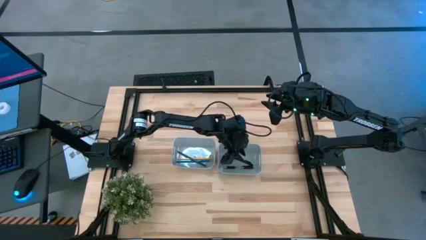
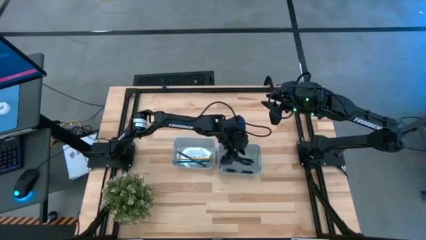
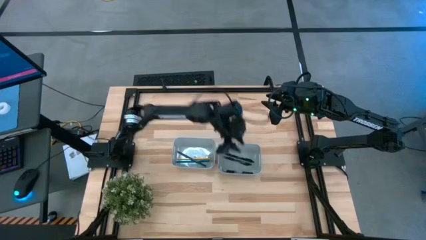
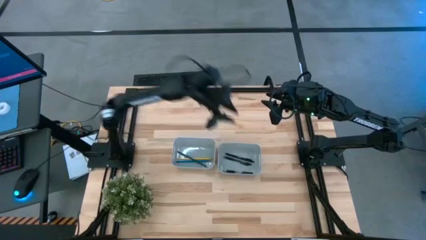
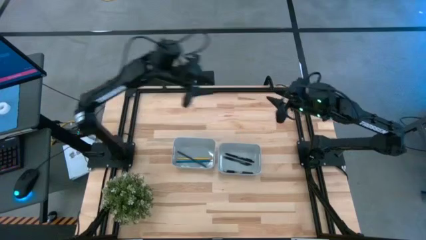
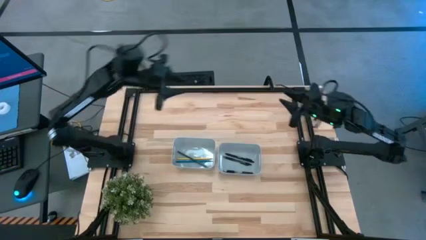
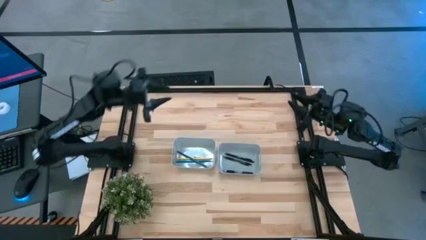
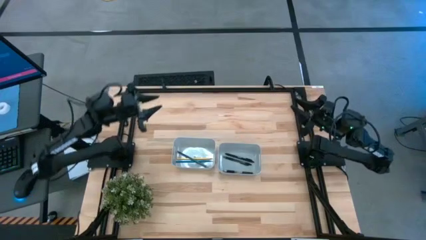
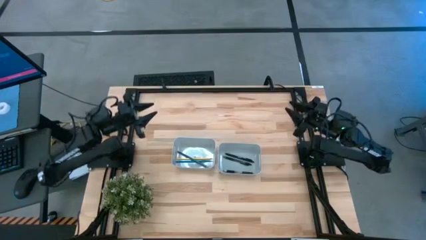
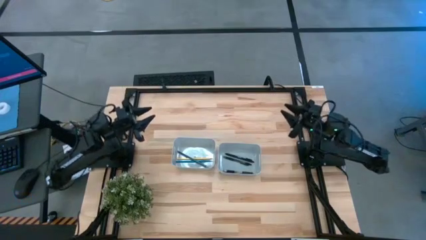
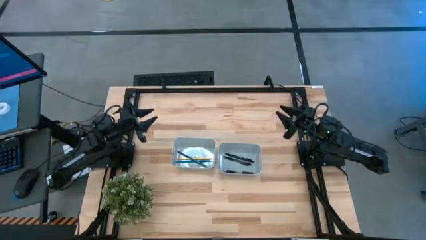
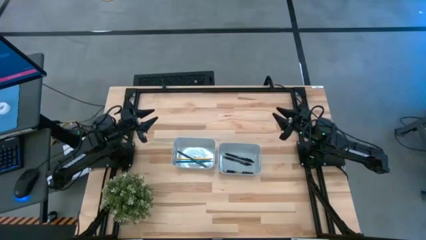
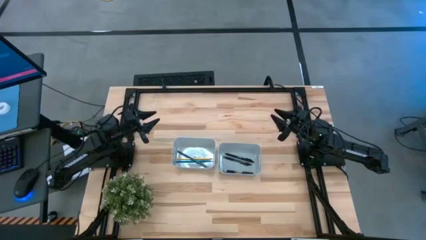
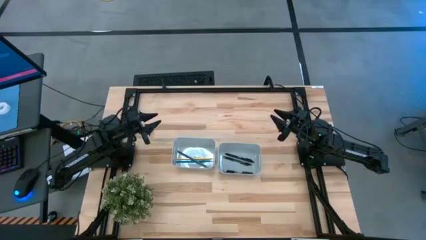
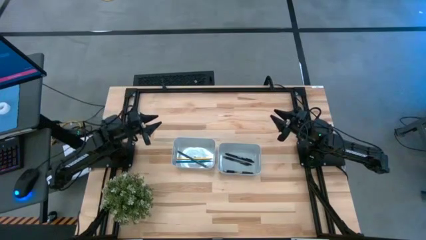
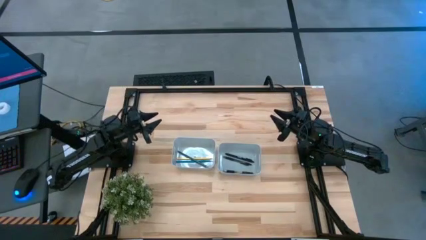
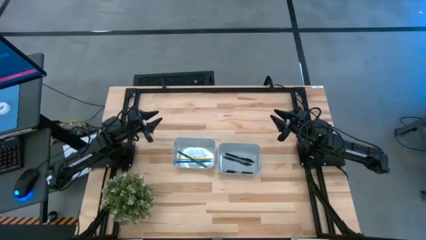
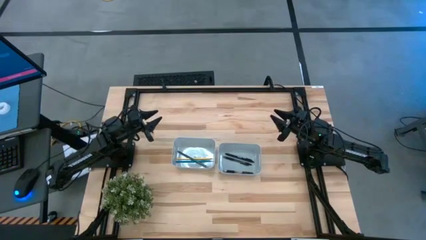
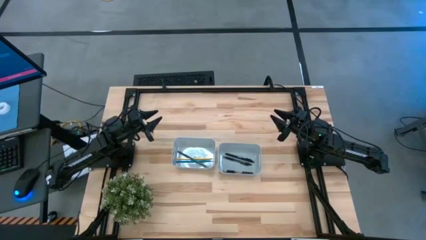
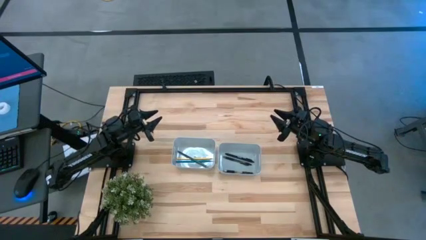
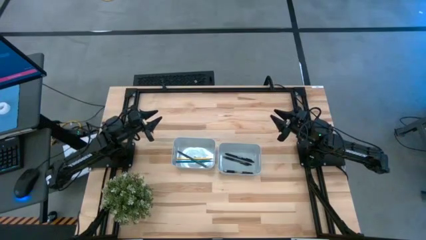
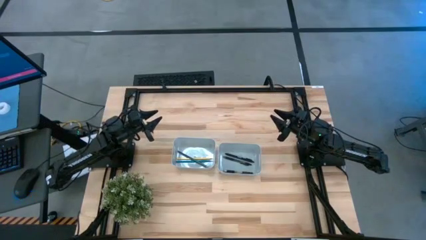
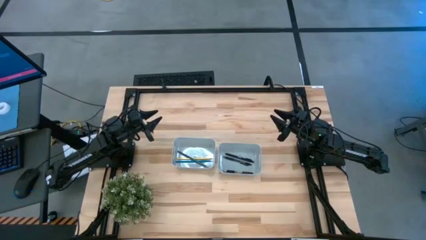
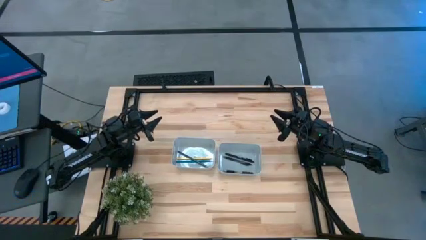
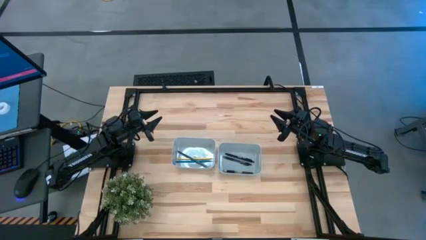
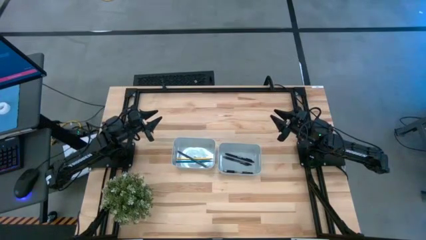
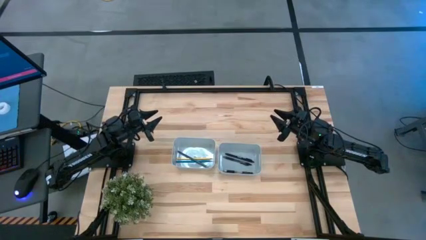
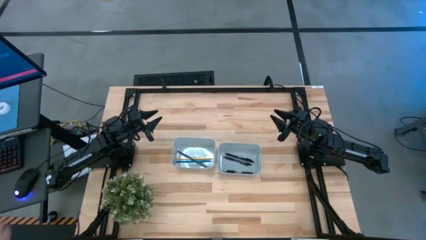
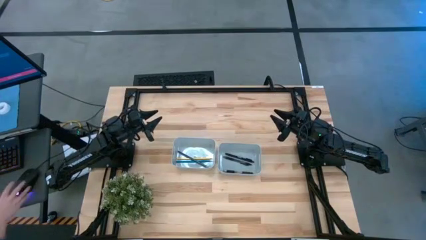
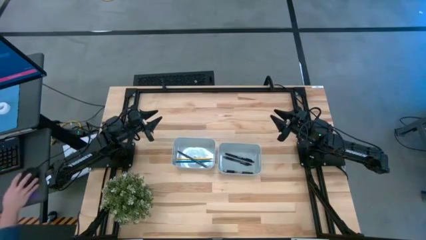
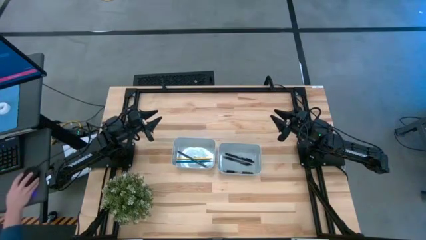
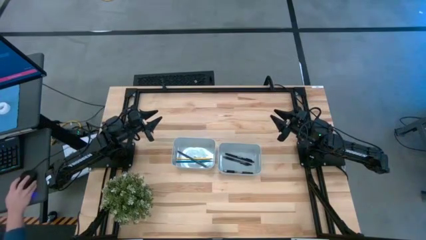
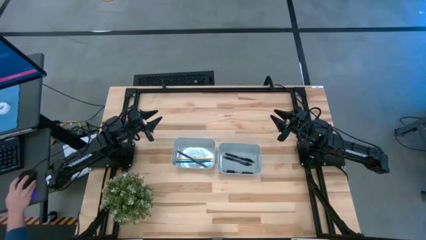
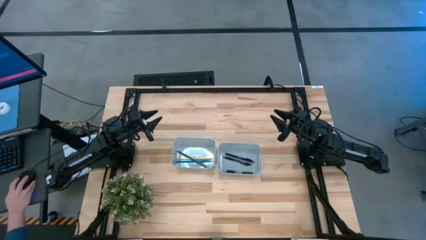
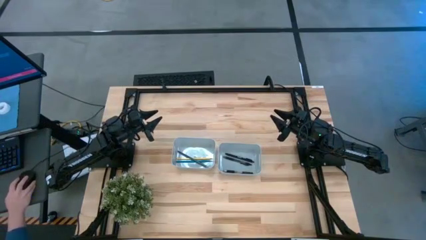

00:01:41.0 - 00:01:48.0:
Task: Sort pens & pencils
Return to Home Position

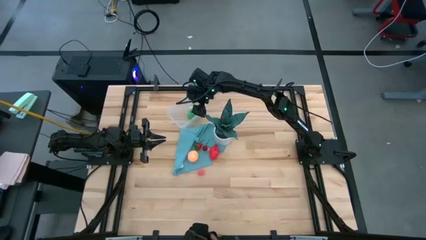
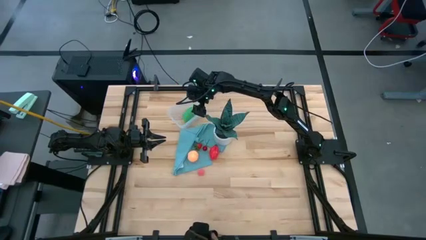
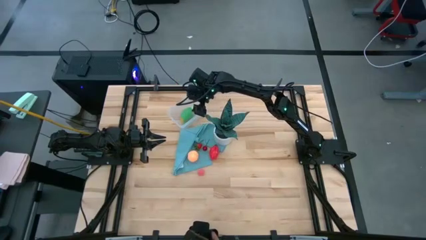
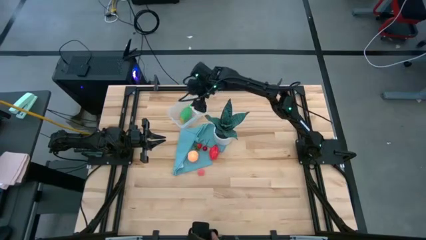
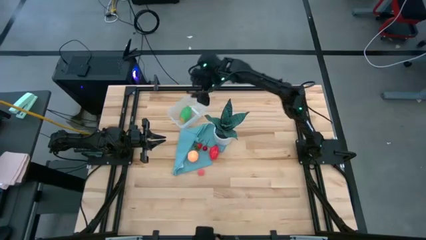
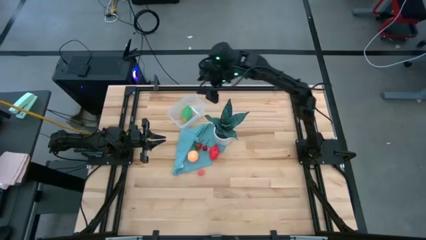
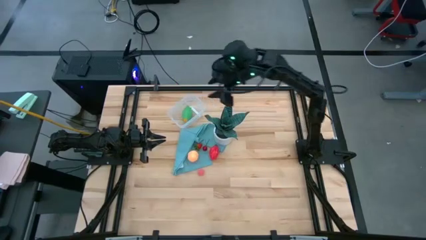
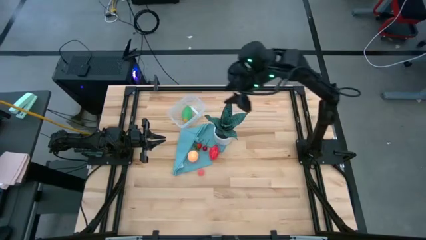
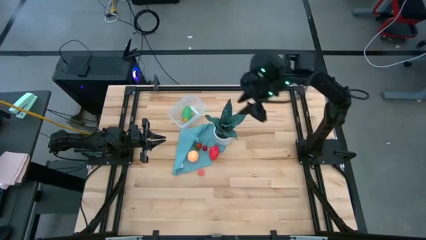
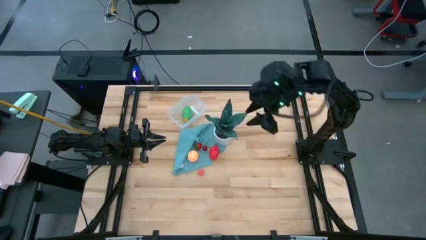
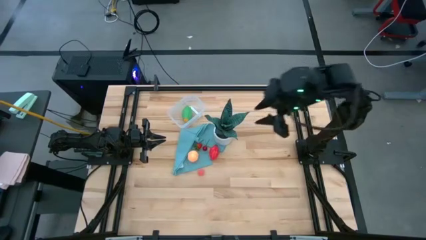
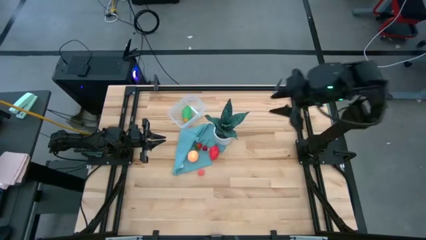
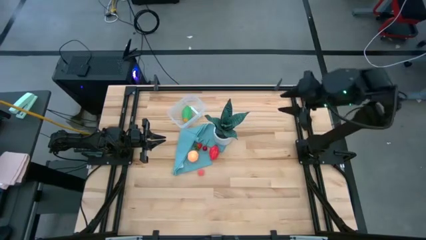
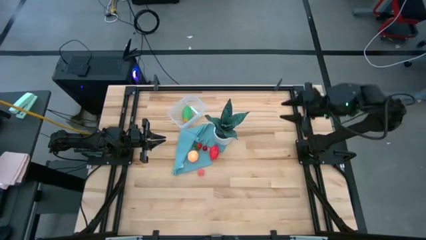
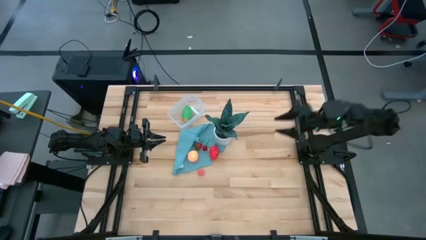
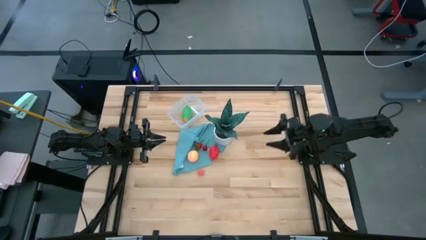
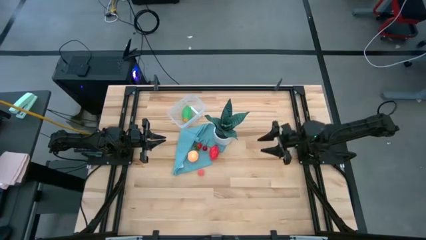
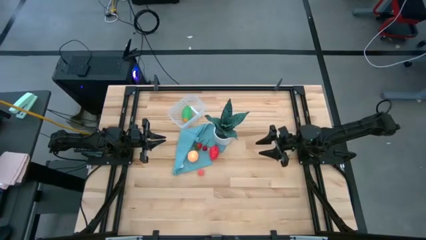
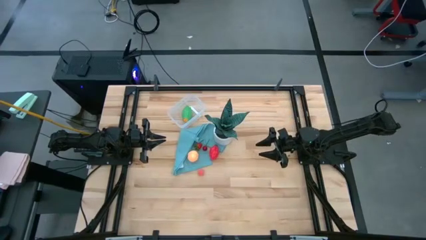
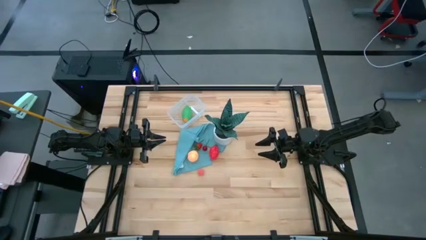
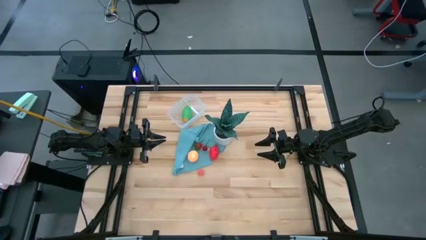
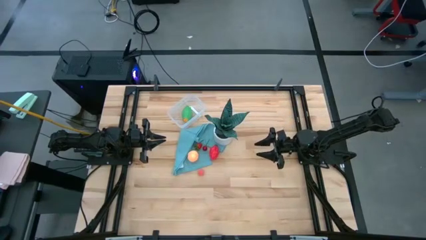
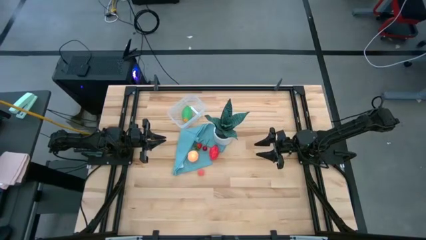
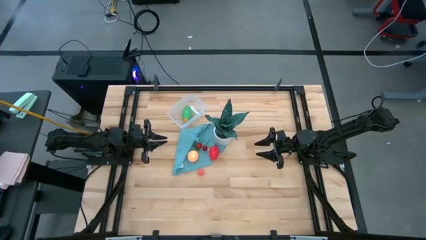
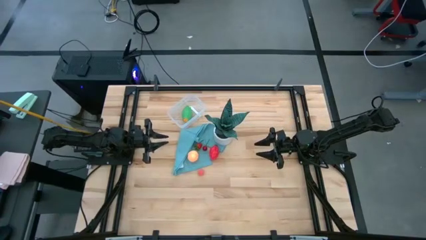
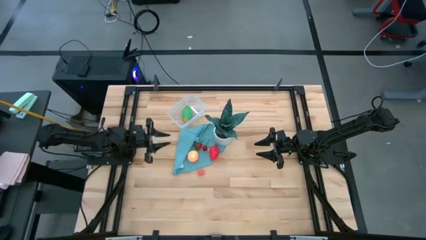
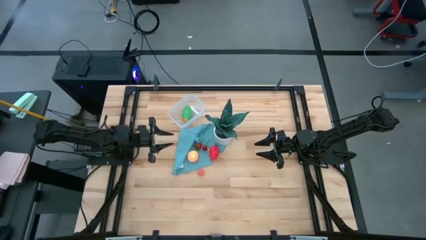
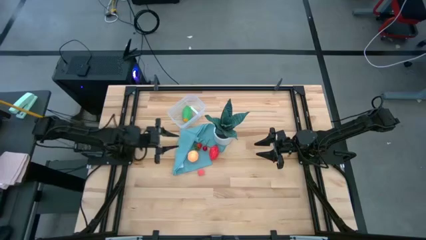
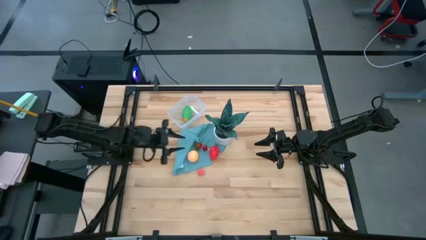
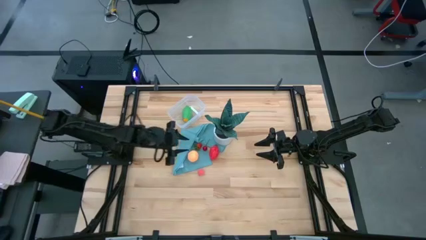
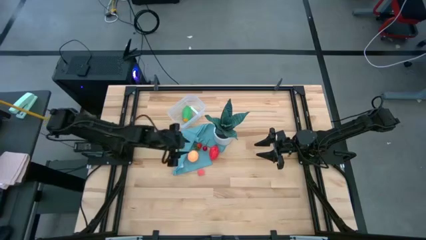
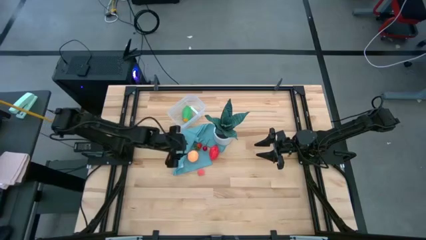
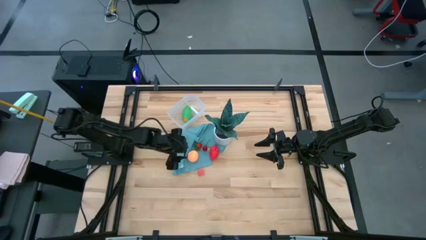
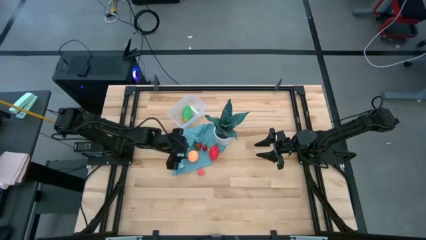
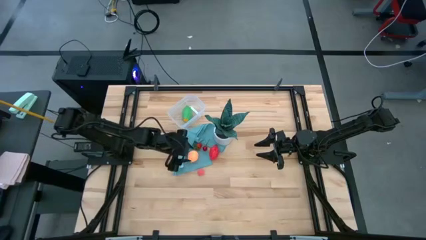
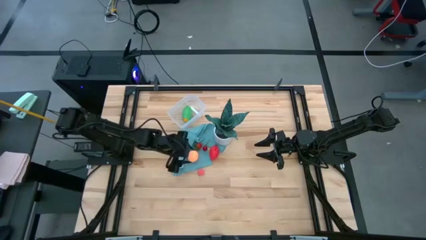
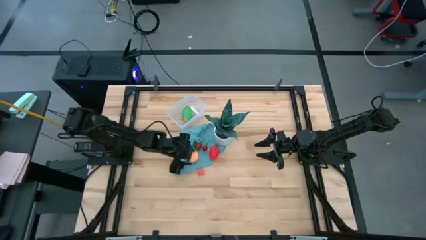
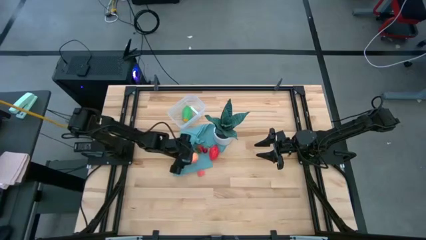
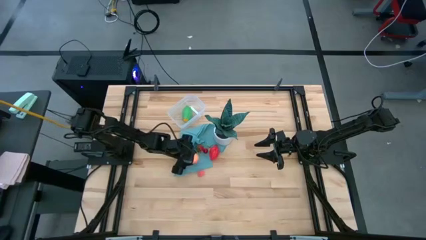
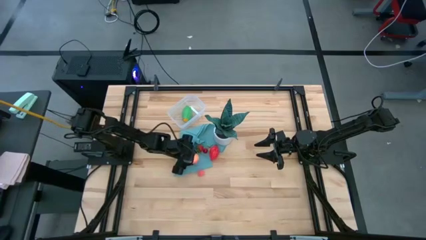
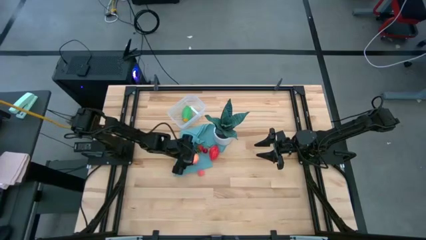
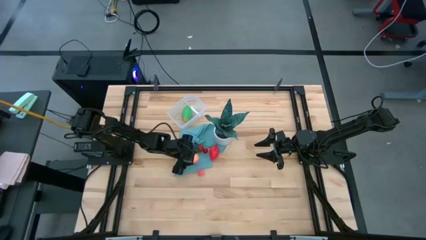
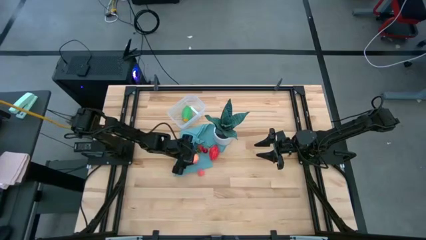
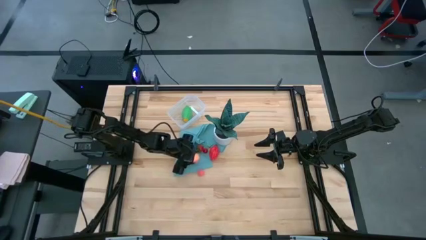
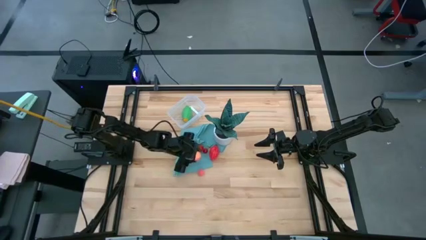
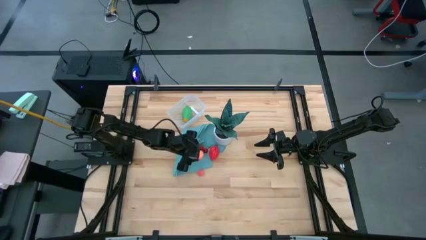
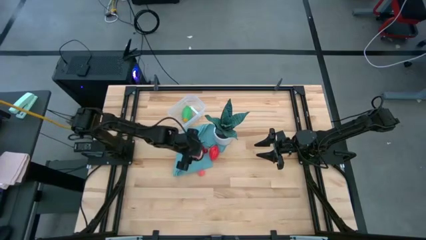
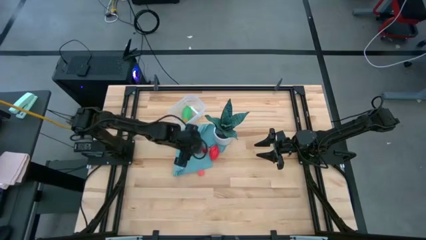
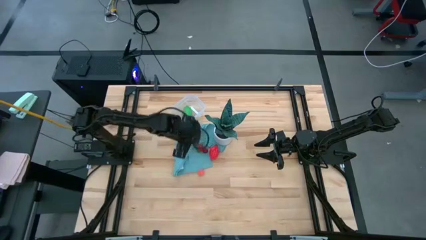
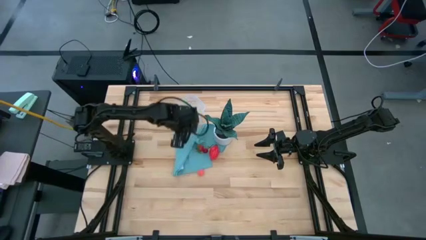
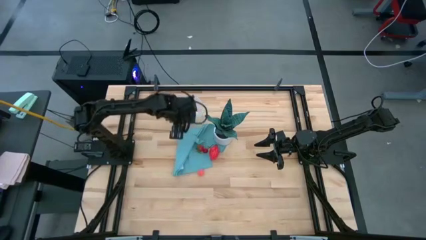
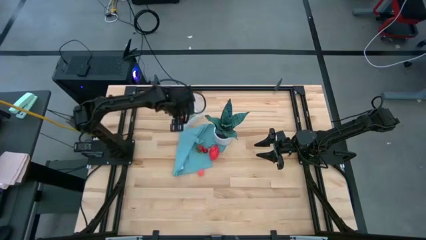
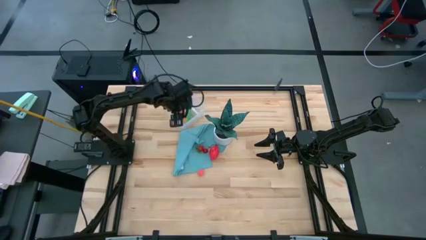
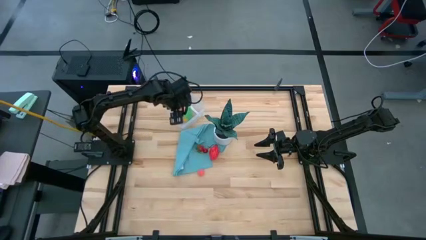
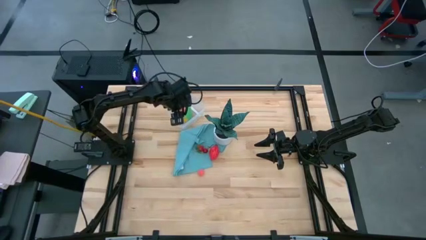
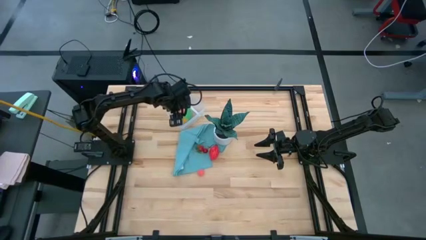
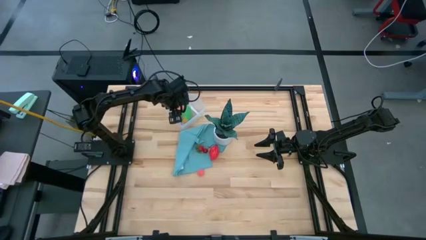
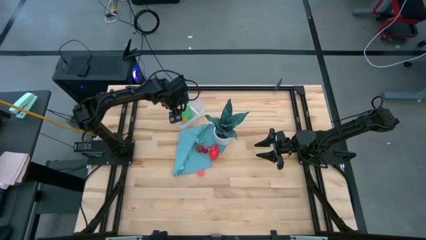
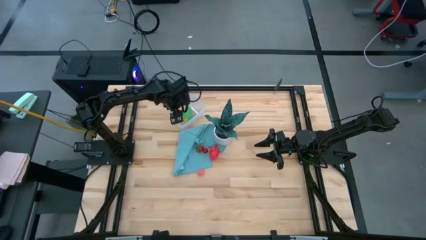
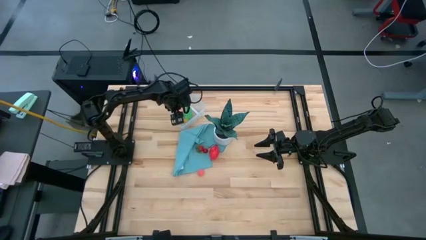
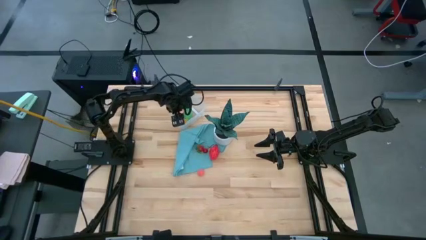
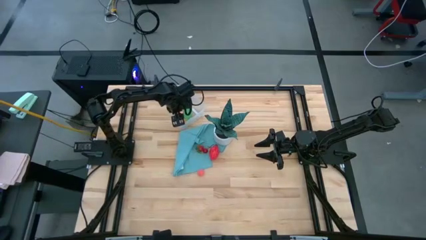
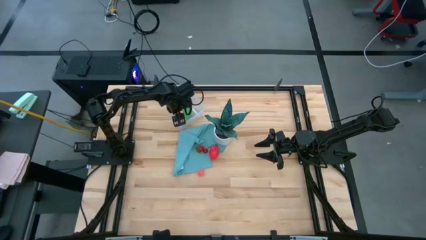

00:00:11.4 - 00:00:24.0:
Task: Pick and placing Produce into tupperware
Put the orange into the transparent bin
